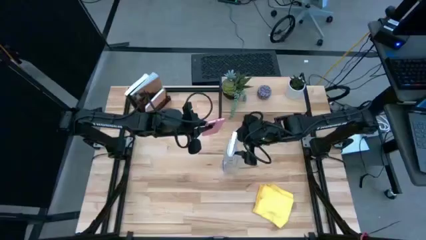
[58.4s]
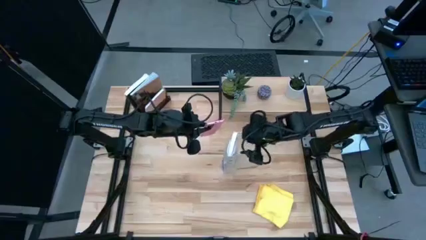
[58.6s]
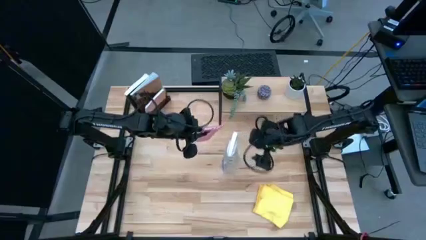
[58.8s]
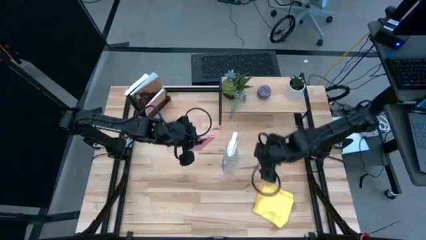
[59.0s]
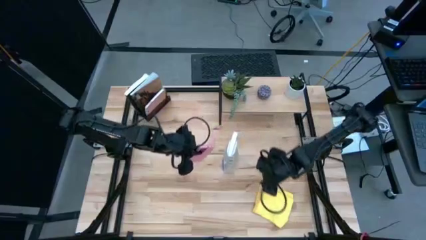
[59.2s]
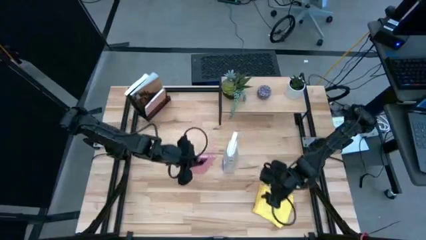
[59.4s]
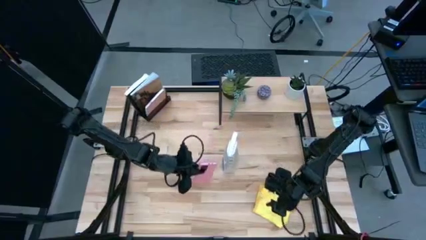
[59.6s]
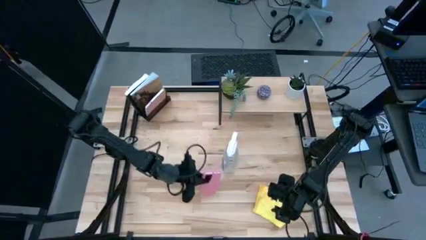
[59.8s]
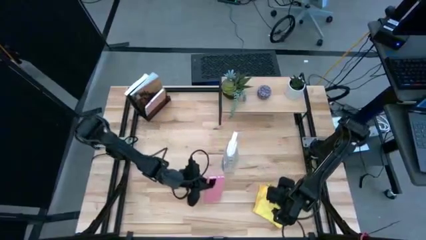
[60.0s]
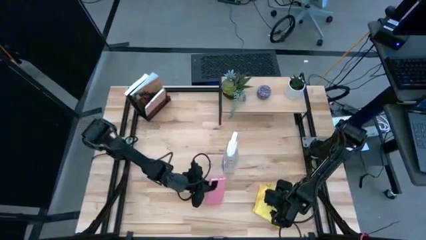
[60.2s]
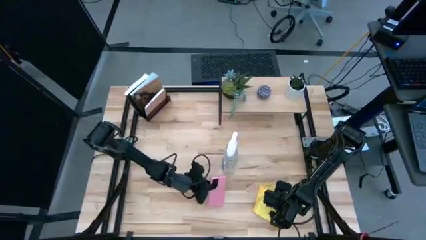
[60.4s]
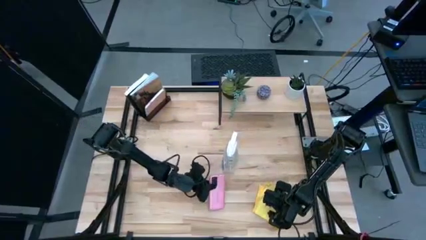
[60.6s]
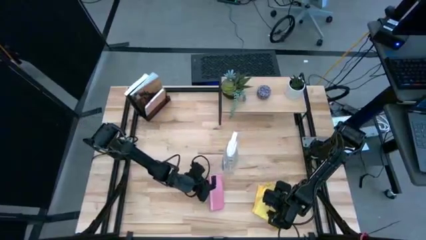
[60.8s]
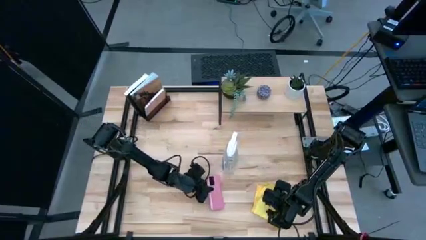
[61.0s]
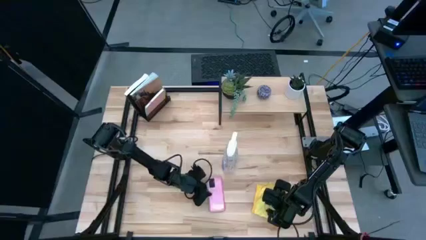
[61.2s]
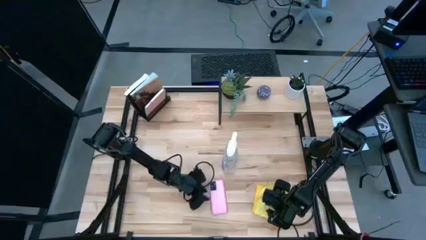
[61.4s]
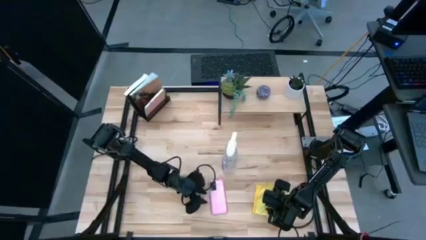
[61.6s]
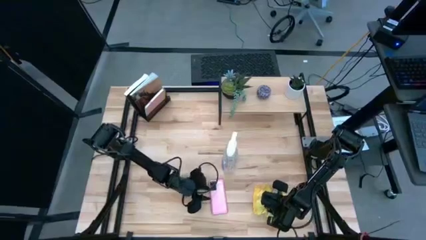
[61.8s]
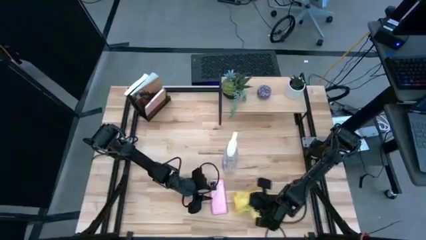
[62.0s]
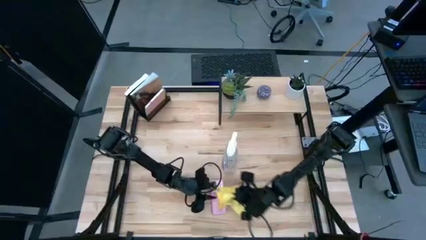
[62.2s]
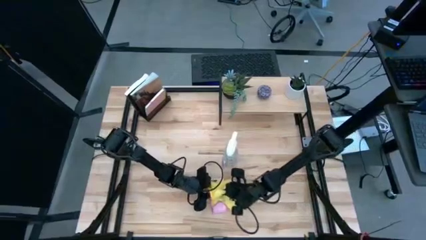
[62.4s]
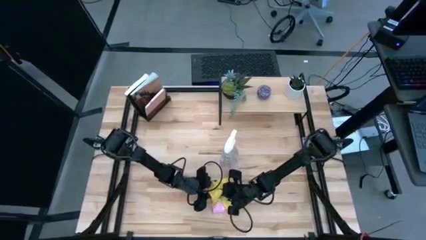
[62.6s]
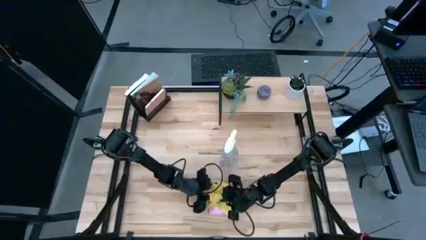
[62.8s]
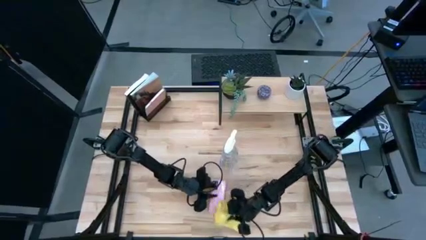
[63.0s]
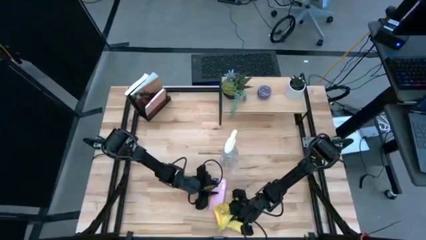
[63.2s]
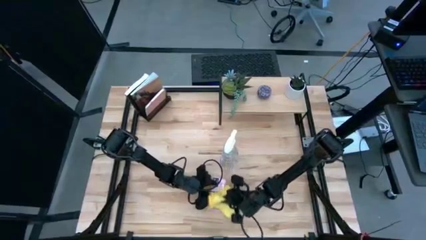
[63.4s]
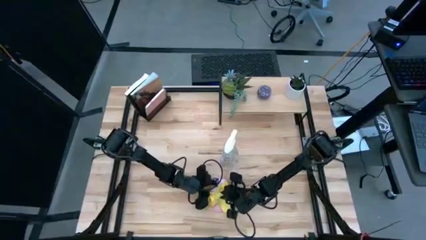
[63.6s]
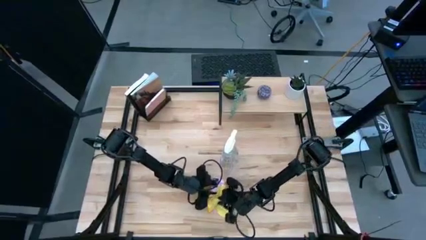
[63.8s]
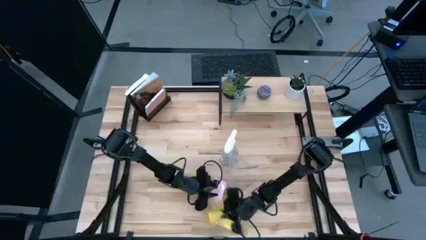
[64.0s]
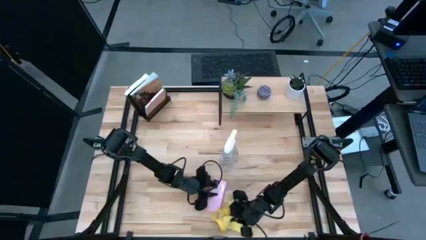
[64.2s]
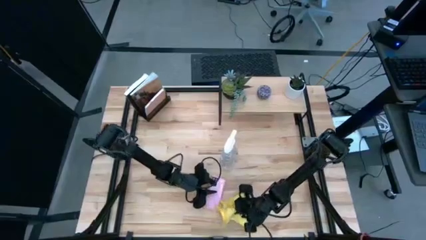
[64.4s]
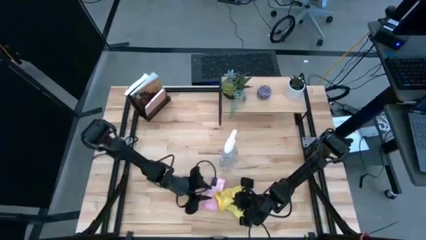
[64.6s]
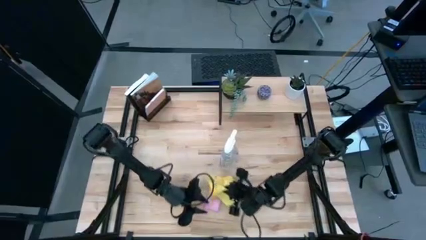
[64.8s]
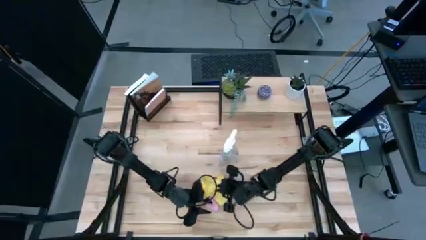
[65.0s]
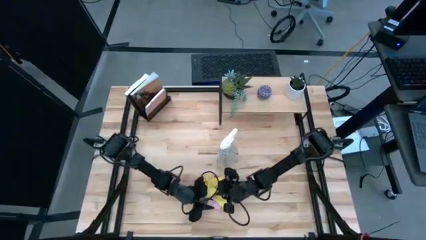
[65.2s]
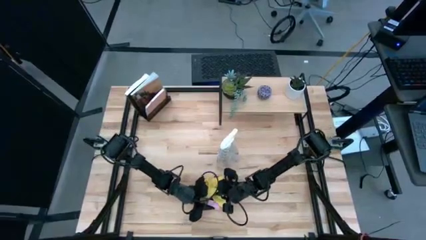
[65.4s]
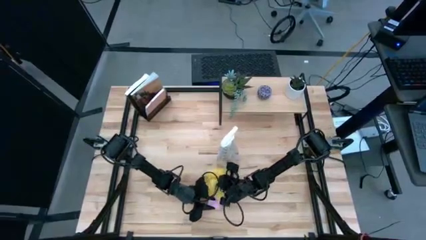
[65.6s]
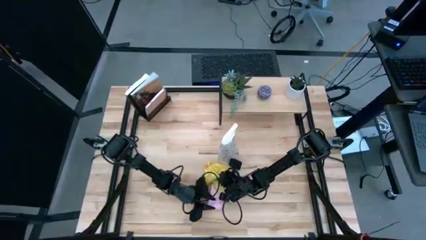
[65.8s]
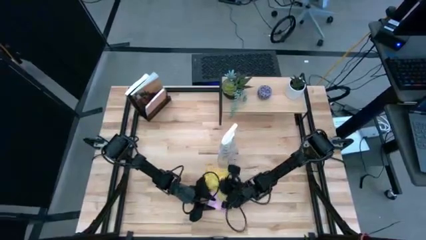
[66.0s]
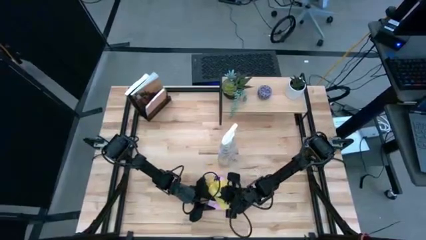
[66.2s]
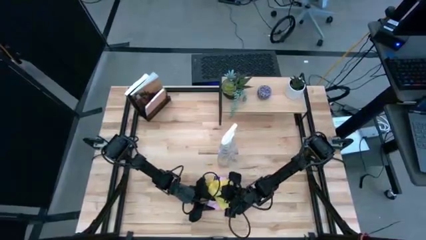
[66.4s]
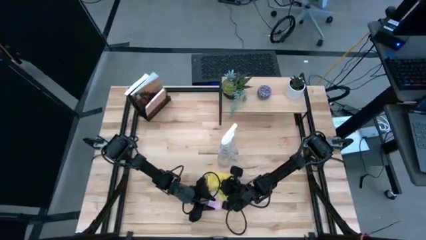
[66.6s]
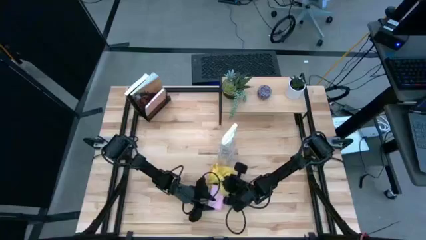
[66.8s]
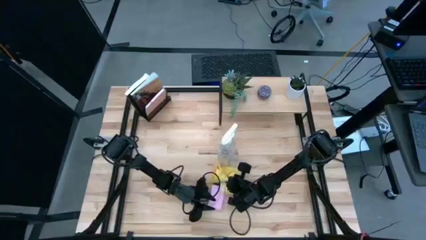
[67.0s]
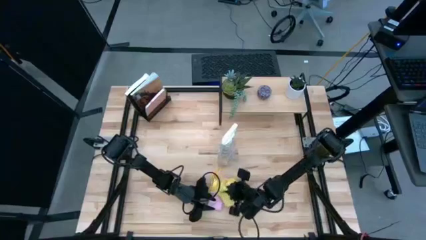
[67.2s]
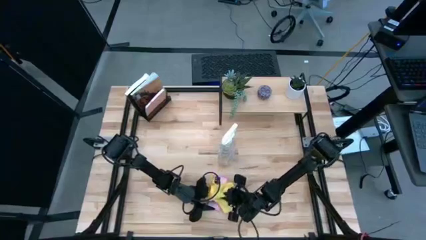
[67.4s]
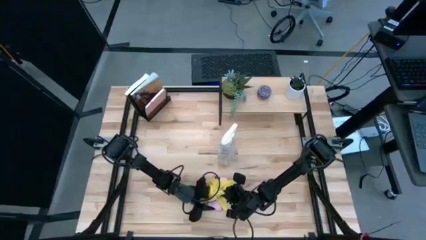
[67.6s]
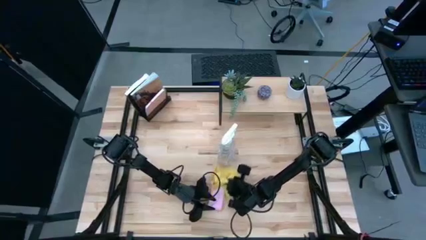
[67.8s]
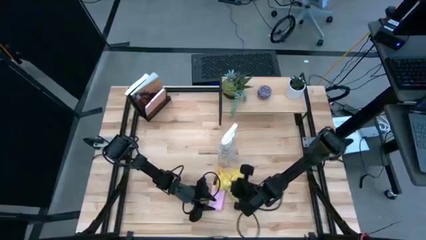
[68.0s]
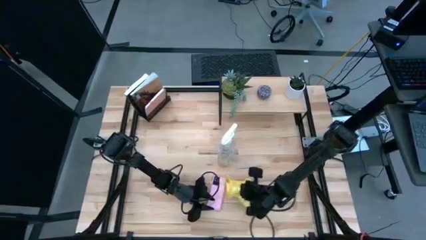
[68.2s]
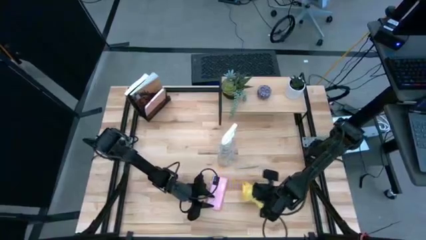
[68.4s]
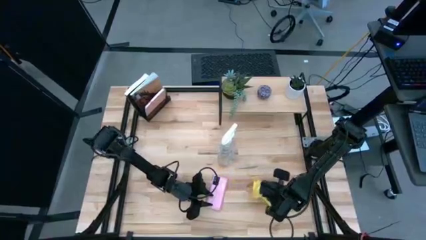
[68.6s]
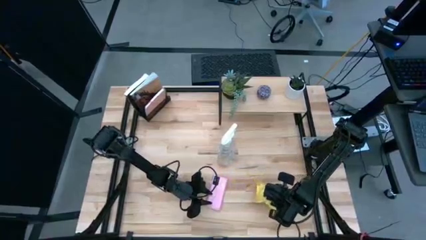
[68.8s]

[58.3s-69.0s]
Task: Apply microfiber cloth
Wipe the back of the cellphone using the microfiber cloth

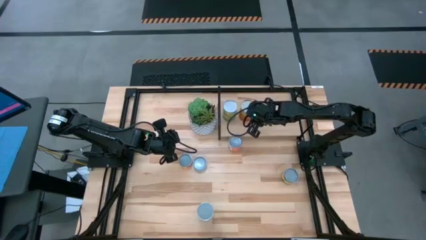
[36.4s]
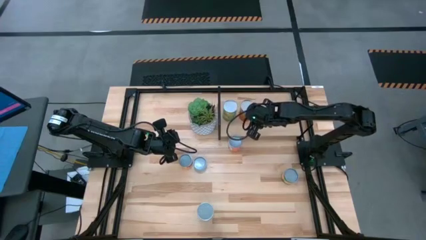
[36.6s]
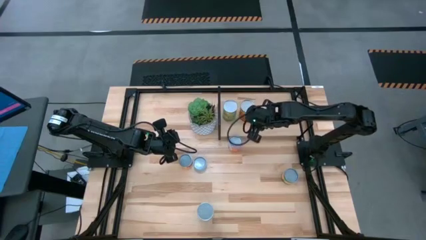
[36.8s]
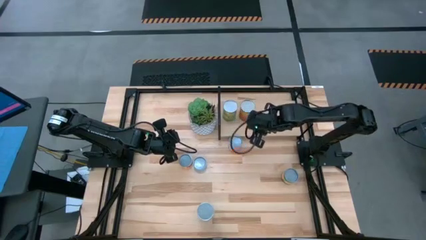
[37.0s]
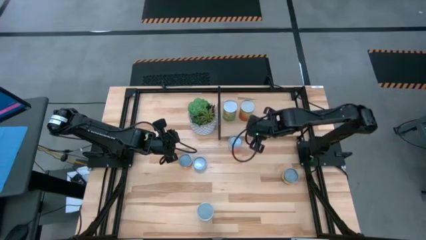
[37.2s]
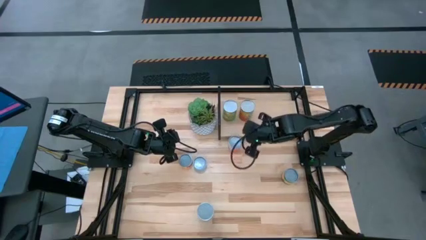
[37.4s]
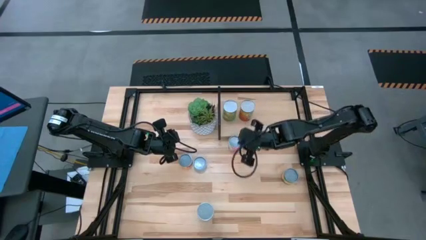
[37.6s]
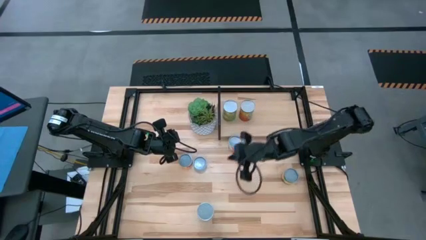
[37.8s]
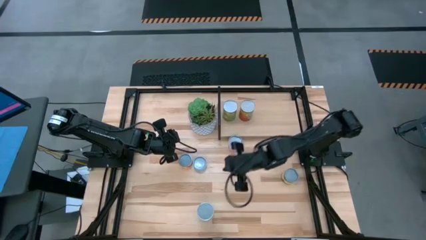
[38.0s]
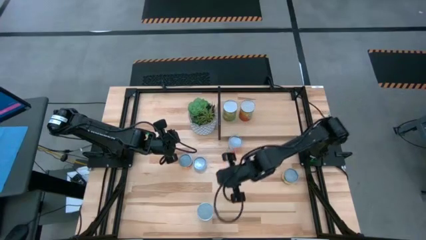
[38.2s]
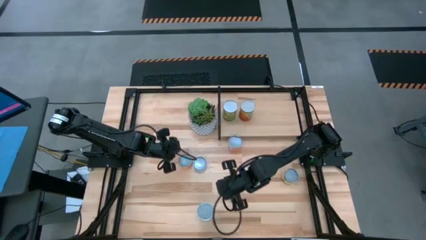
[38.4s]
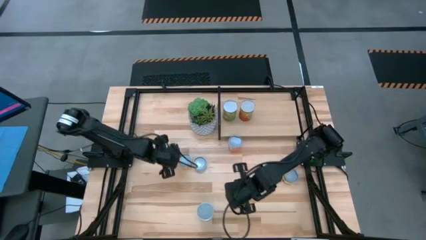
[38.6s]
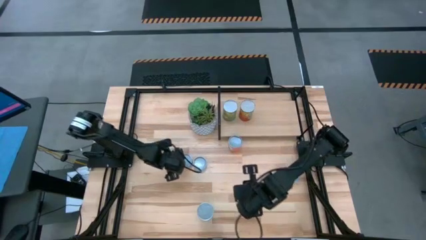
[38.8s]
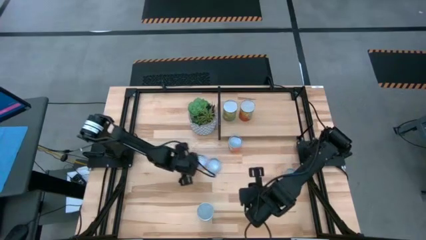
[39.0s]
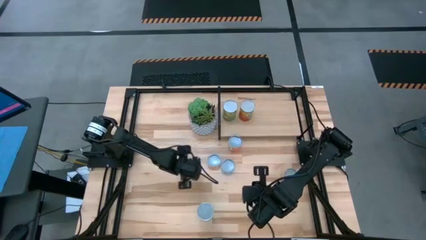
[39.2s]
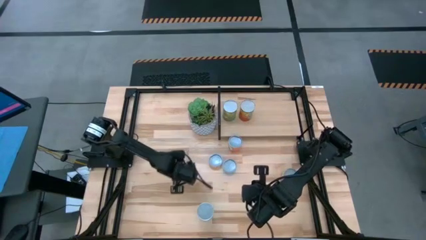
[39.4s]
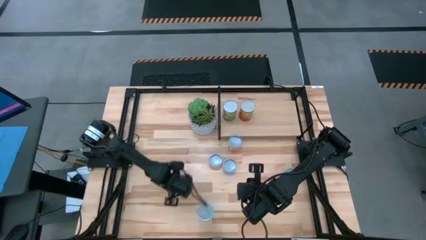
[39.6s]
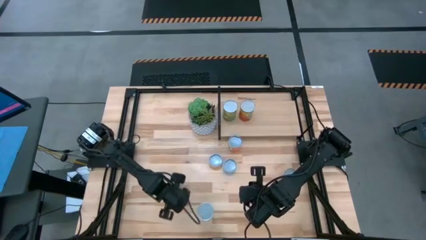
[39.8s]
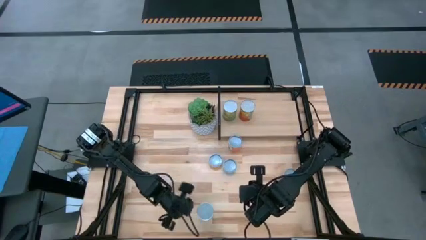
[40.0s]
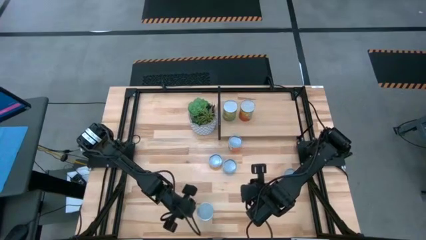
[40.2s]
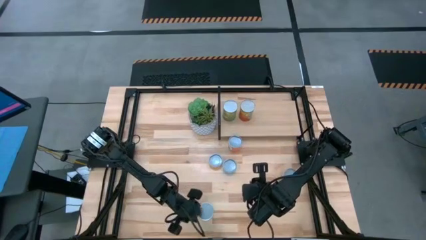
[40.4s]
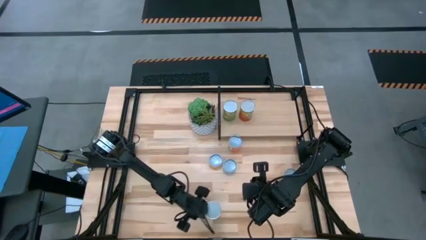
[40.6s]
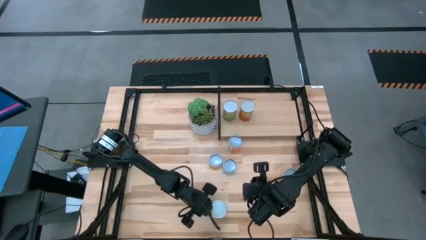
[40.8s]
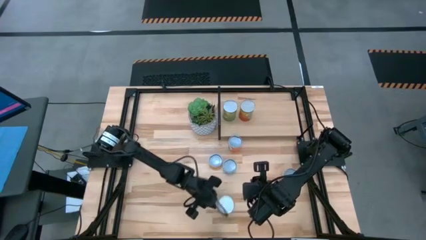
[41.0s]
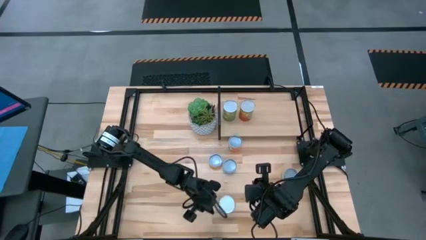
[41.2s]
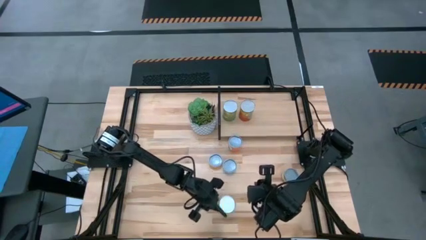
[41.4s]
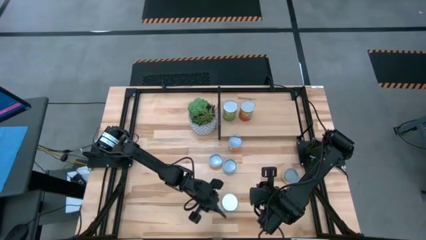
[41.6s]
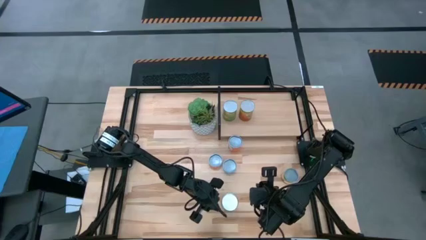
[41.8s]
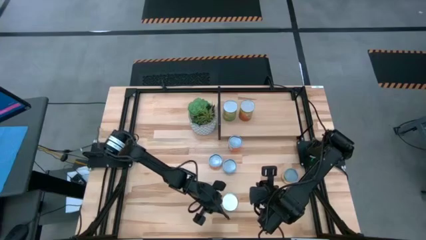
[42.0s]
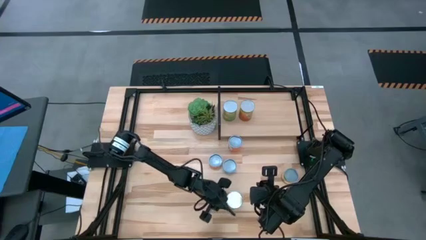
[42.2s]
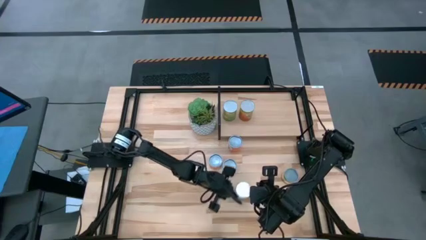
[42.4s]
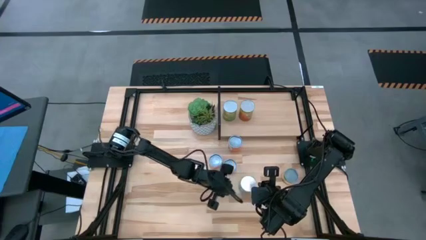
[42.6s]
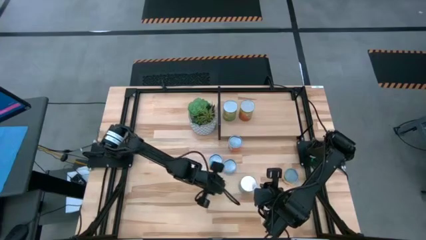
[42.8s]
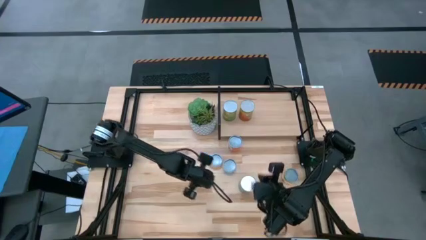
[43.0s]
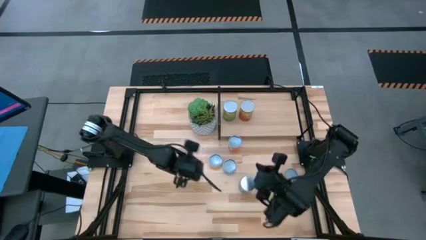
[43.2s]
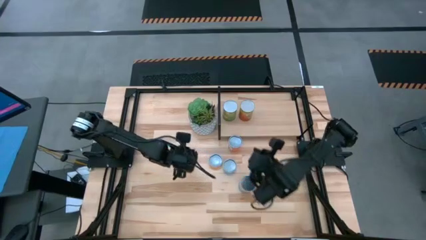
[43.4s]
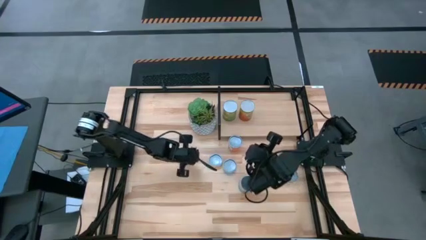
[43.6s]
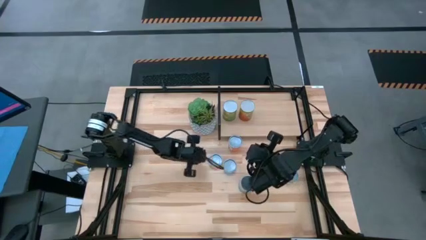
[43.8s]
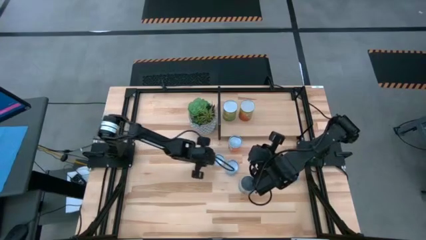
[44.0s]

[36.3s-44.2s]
Task: Pick and place cans onto a shelf
Adjust the canned goods
